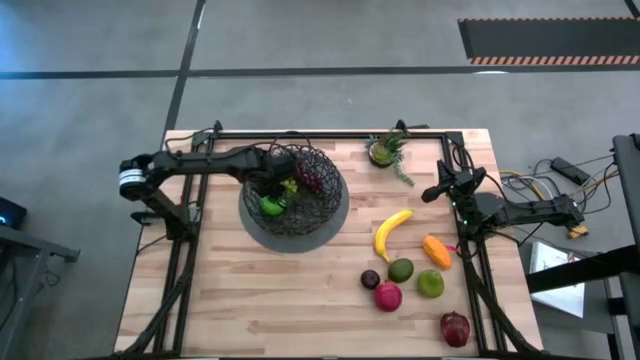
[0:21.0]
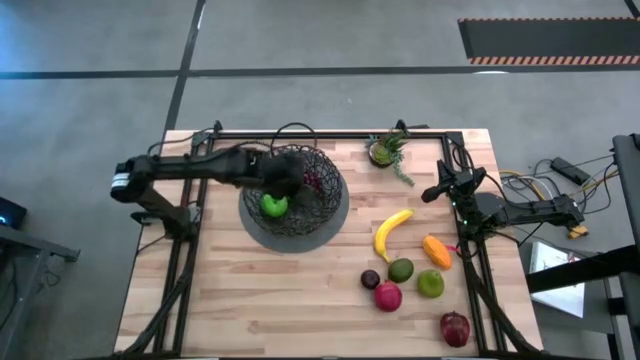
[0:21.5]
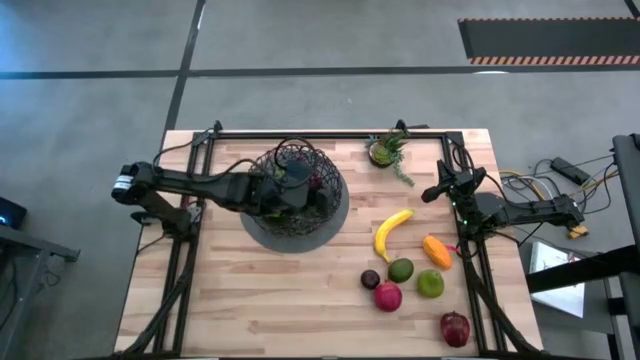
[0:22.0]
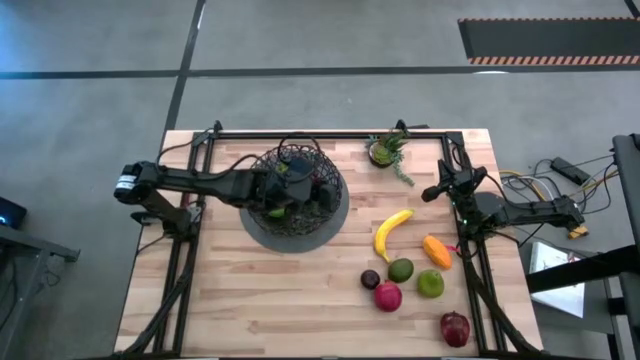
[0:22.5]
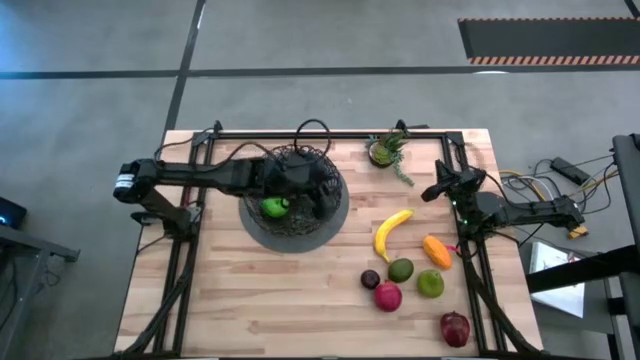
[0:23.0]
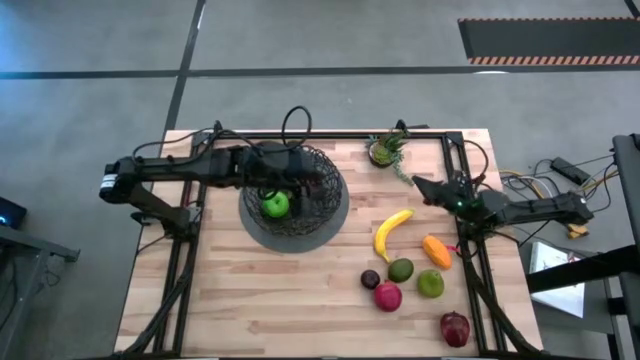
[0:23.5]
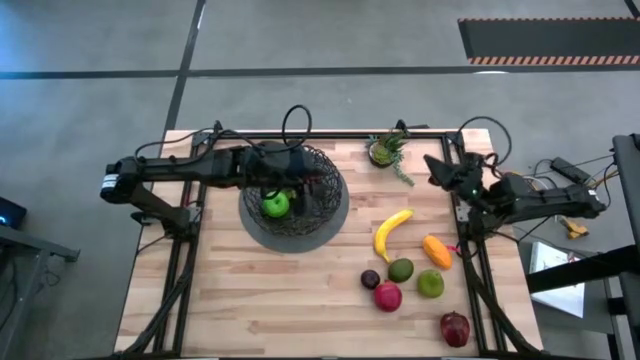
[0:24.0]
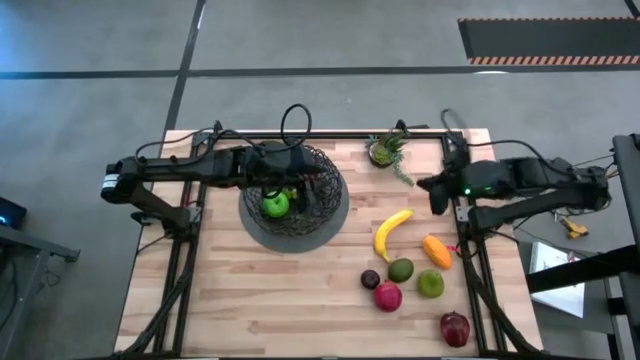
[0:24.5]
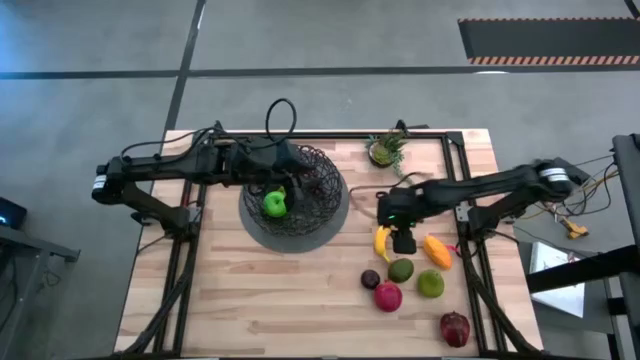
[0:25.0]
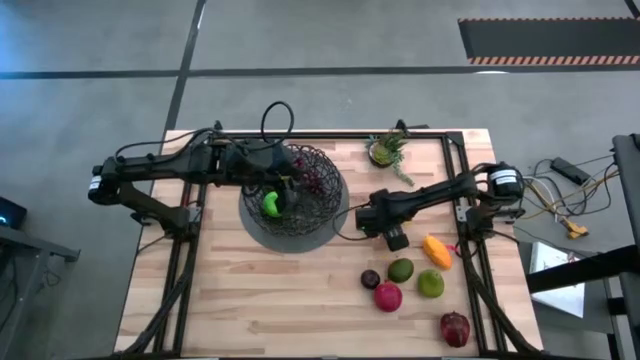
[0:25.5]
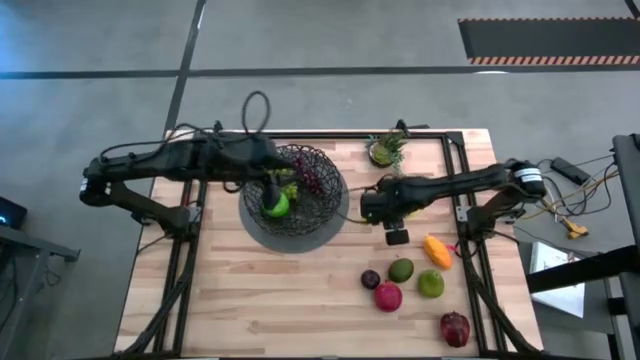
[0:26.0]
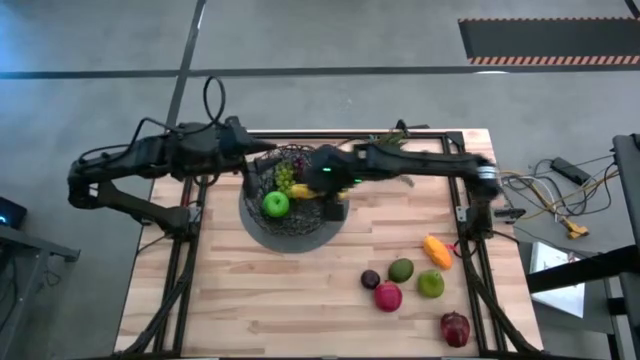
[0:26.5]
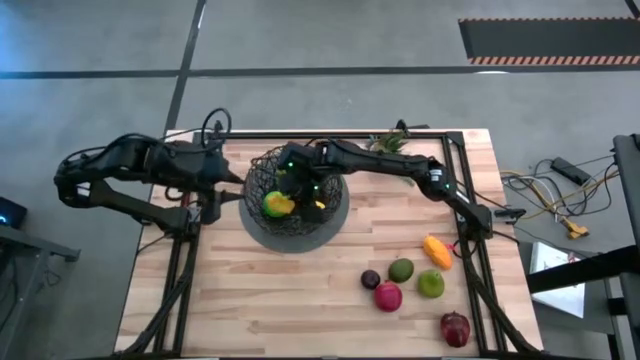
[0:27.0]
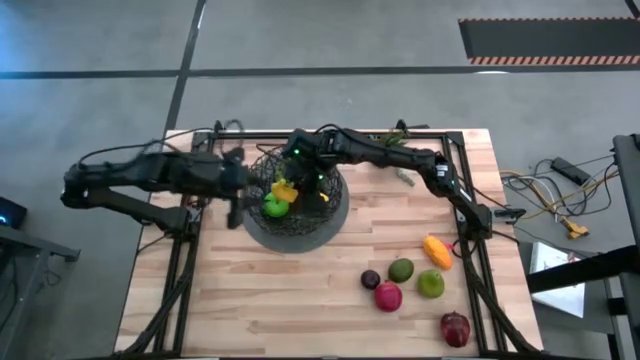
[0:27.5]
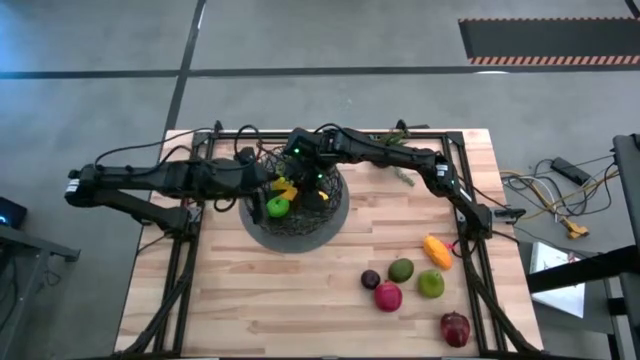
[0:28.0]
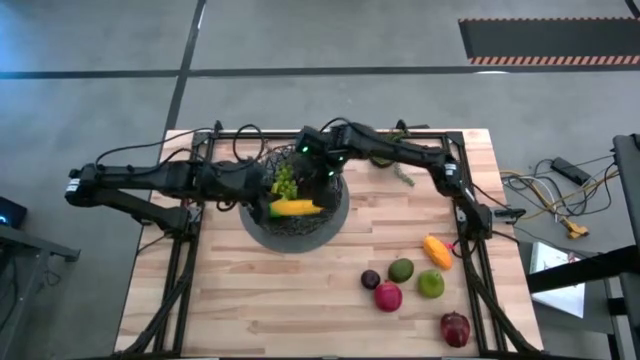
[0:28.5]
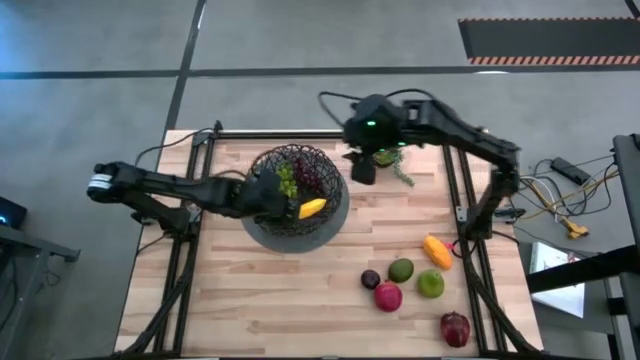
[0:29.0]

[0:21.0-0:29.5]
Task: Build produce basket
Put the banana into the basket

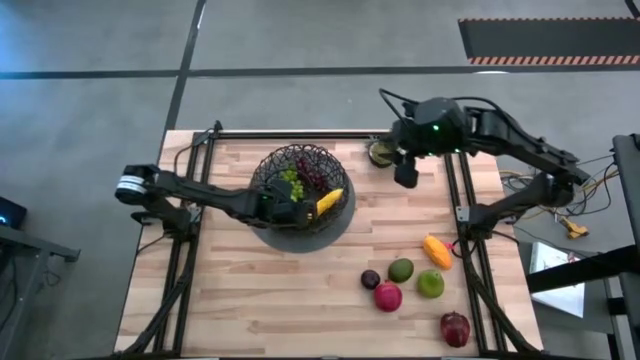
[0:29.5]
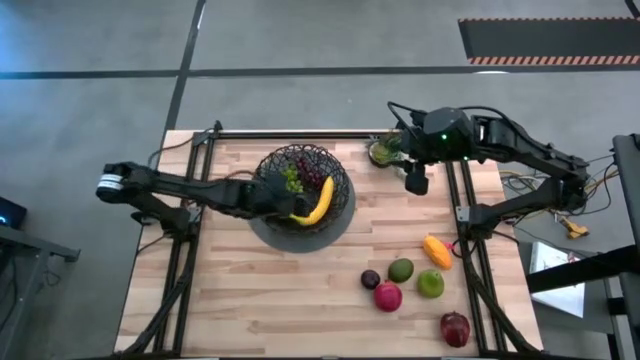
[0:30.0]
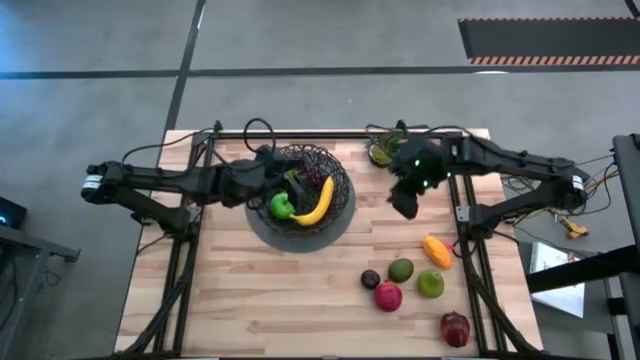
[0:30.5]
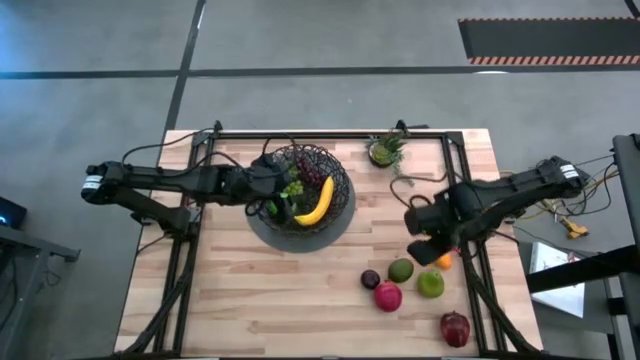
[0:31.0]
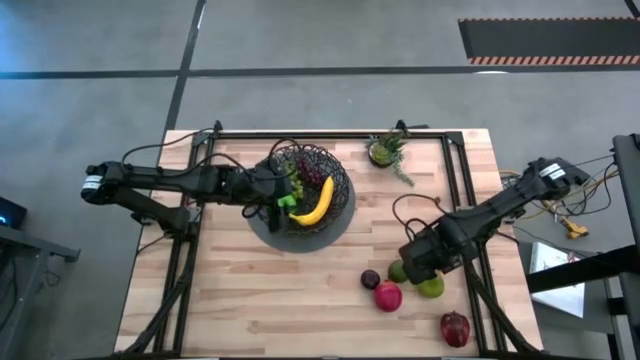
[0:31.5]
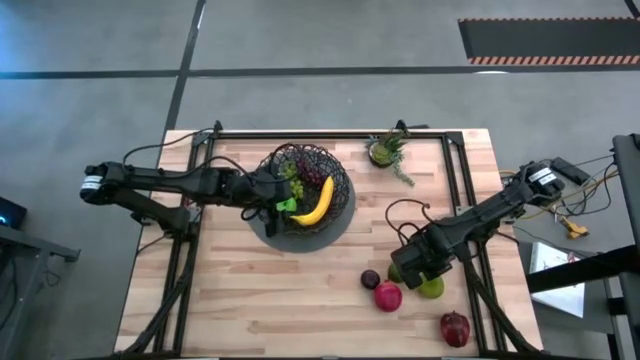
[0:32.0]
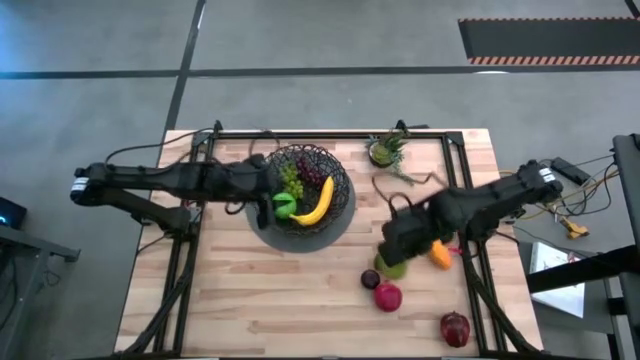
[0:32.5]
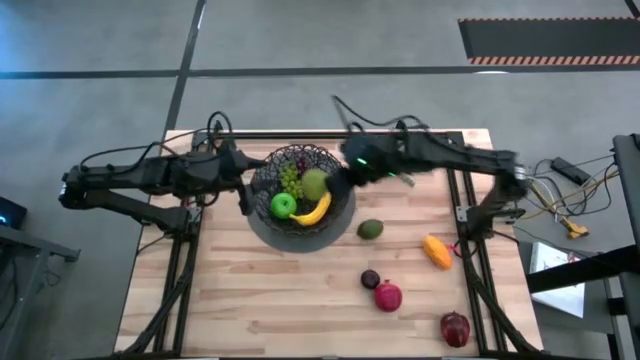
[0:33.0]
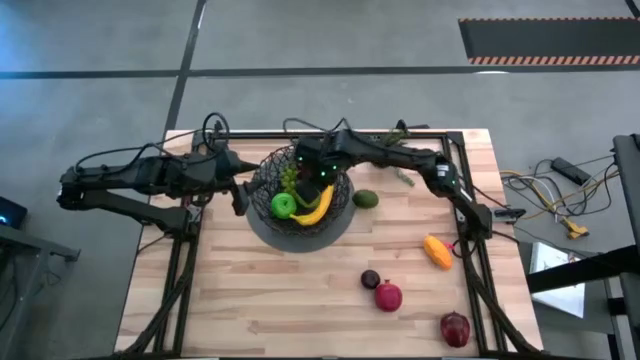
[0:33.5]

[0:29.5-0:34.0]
Put the pear into the basket

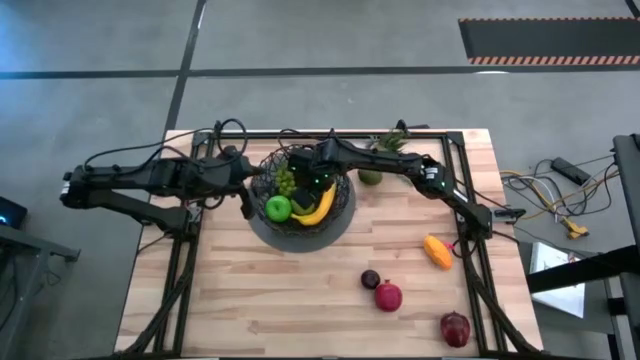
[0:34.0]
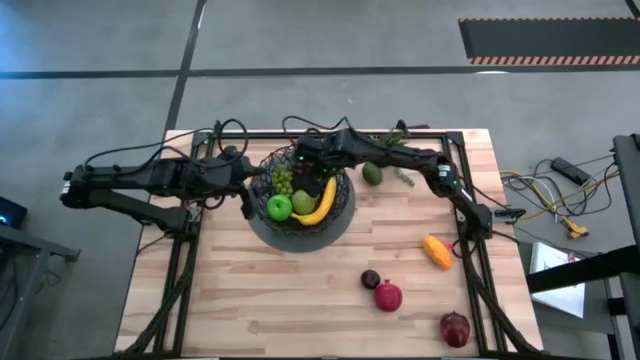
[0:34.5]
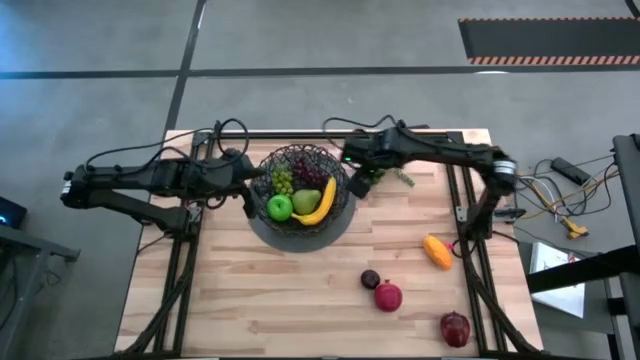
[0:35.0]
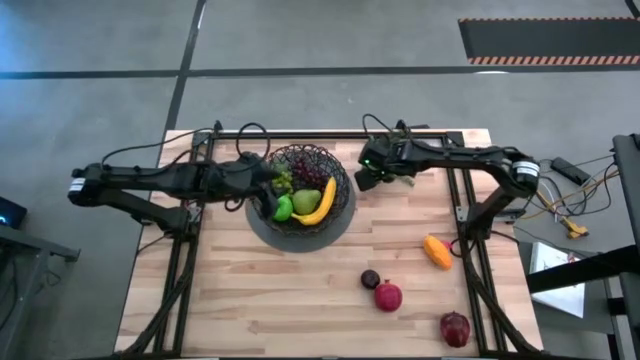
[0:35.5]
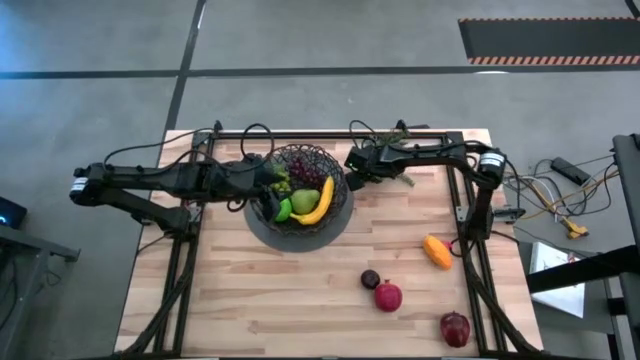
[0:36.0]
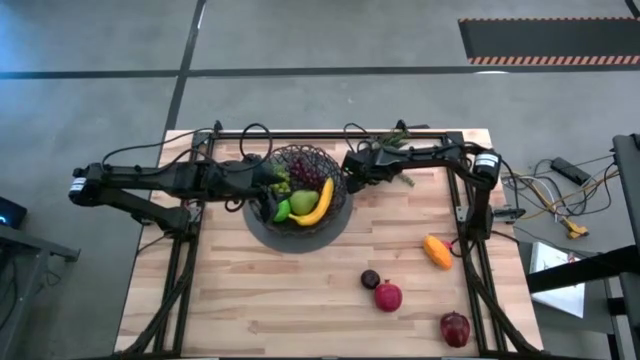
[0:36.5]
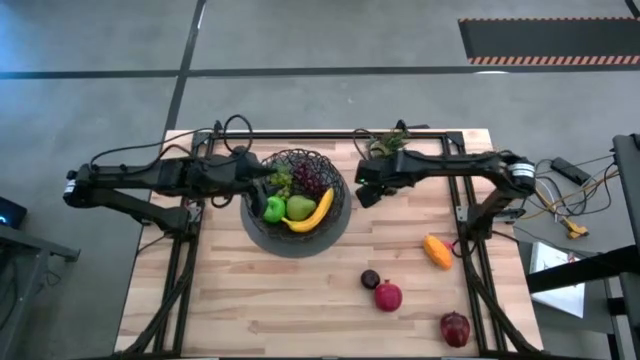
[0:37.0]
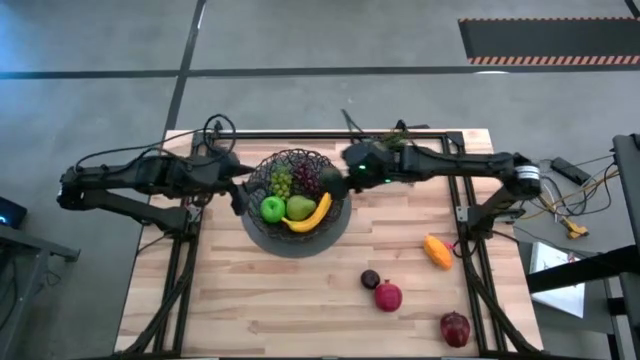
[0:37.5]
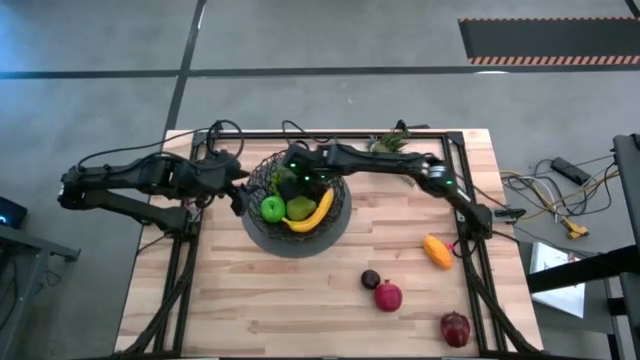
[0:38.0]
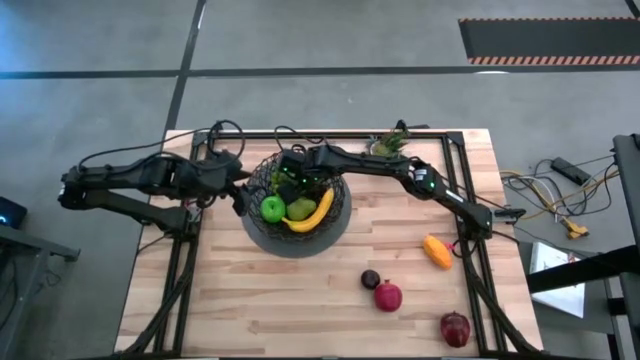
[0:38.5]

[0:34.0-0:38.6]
Put the green lime into the basket

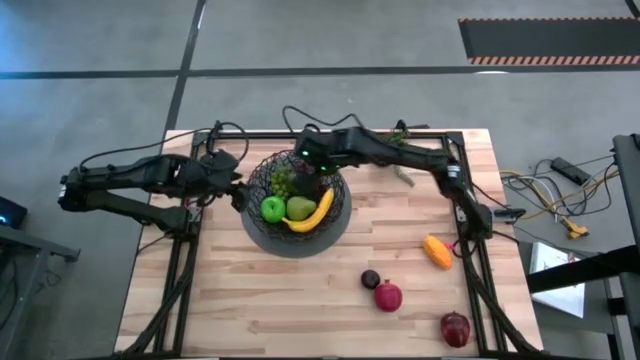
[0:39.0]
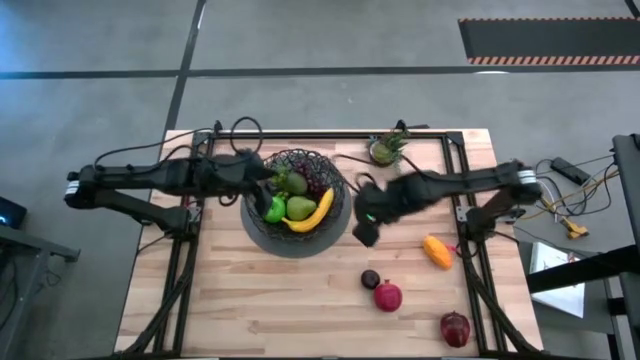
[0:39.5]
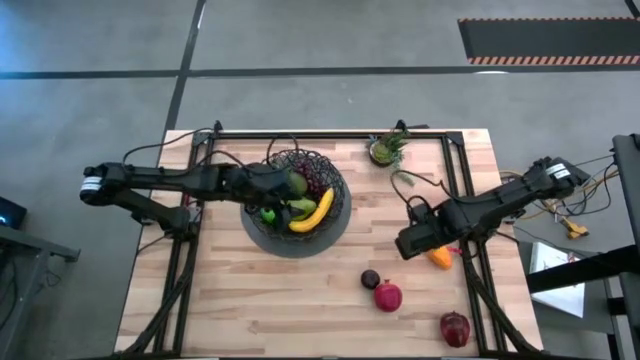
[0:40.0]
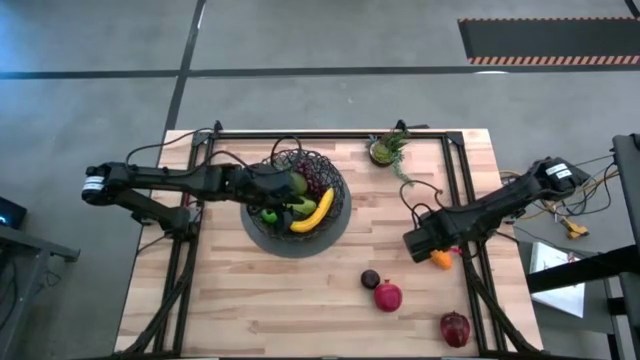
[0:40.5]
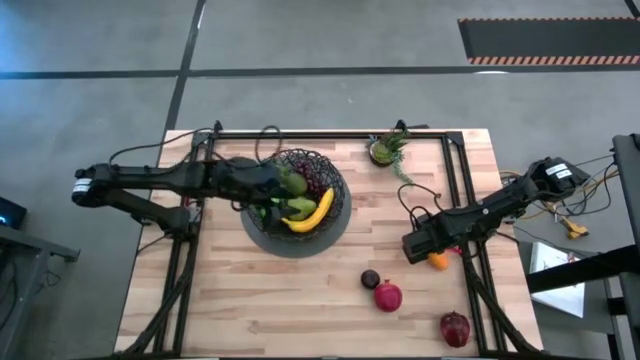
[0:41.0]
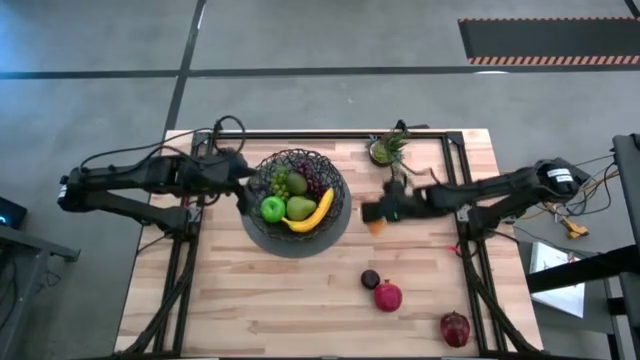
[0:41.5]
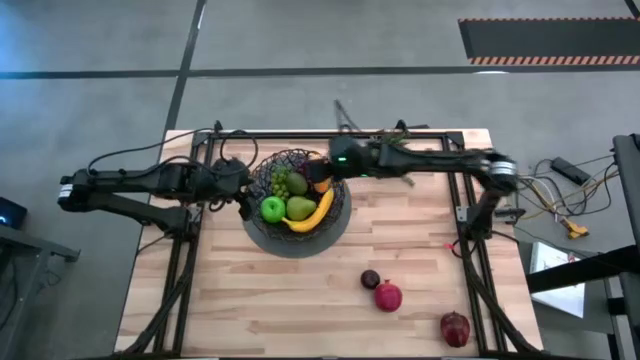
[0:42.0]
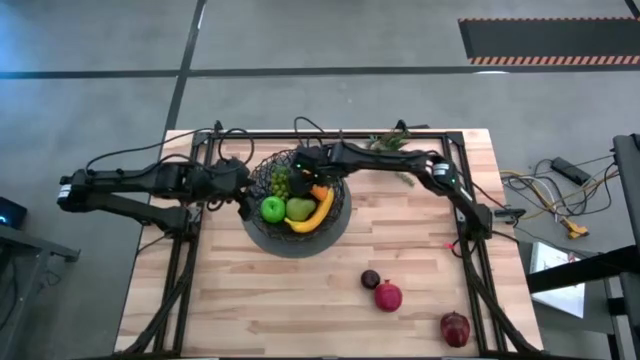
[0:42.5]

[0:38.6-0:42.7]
Put the mango into the basket
